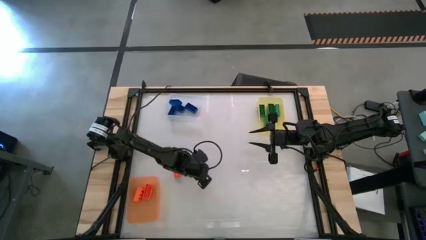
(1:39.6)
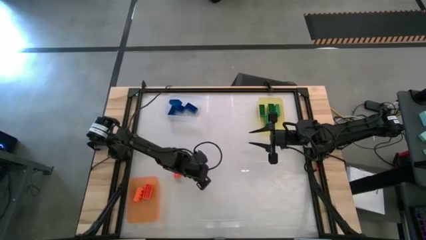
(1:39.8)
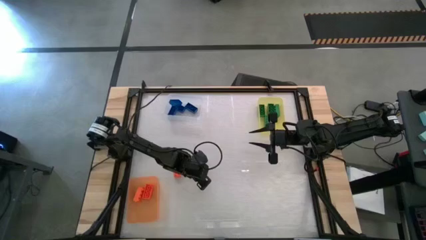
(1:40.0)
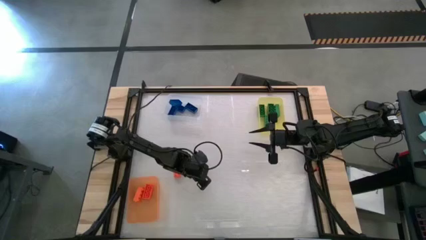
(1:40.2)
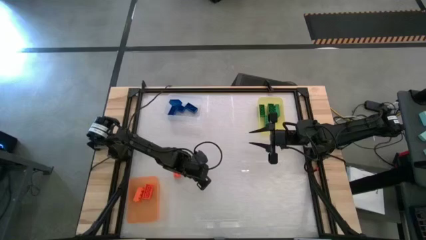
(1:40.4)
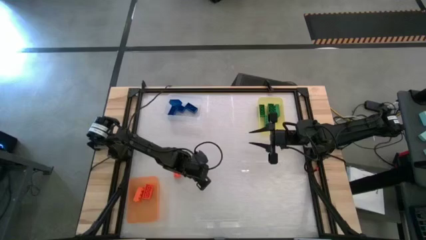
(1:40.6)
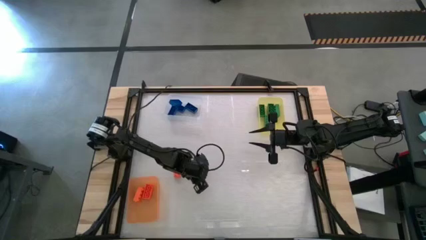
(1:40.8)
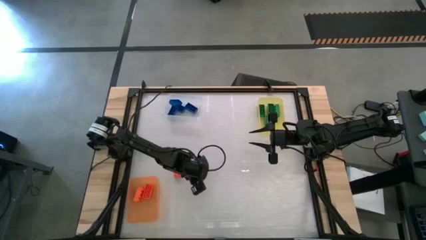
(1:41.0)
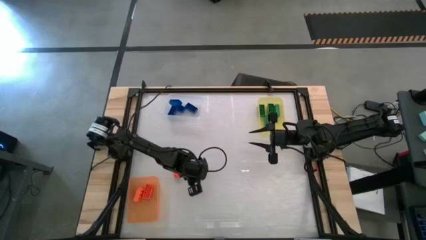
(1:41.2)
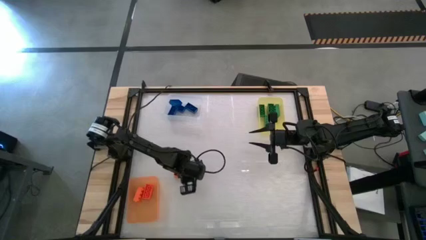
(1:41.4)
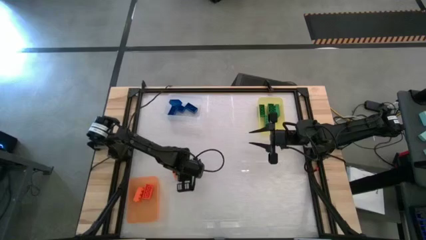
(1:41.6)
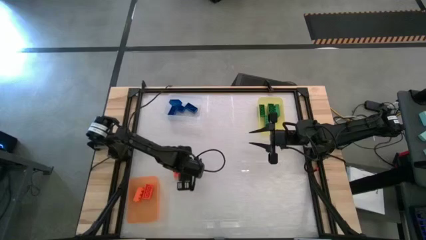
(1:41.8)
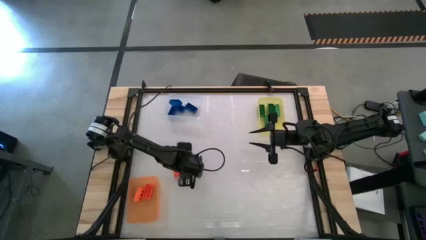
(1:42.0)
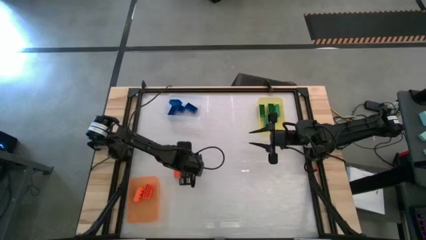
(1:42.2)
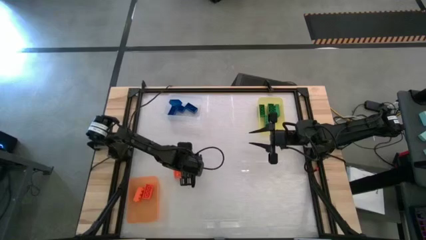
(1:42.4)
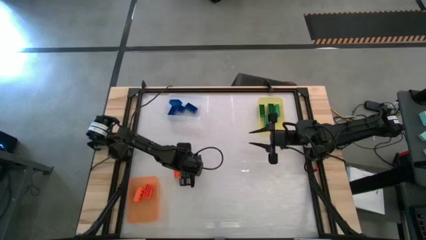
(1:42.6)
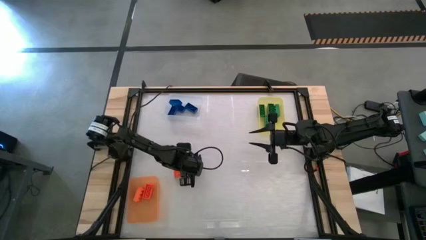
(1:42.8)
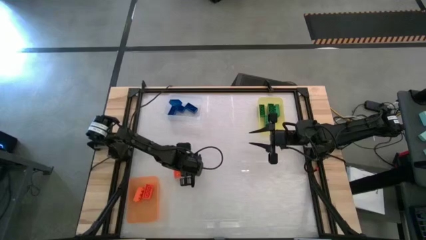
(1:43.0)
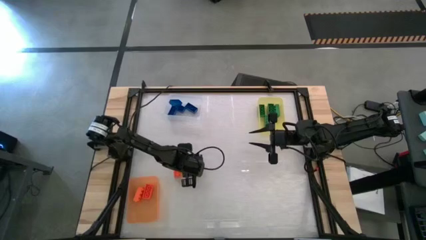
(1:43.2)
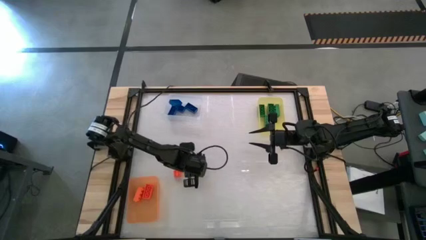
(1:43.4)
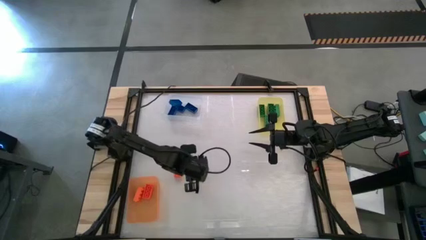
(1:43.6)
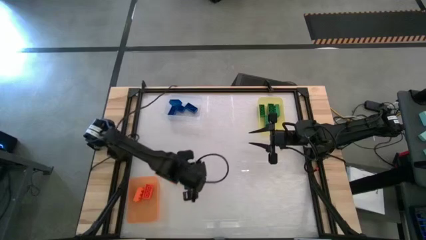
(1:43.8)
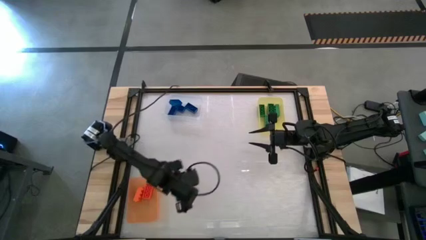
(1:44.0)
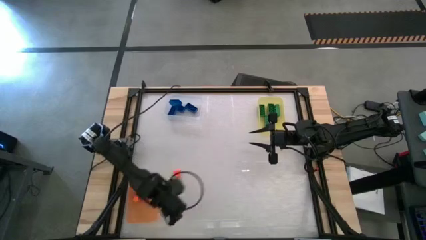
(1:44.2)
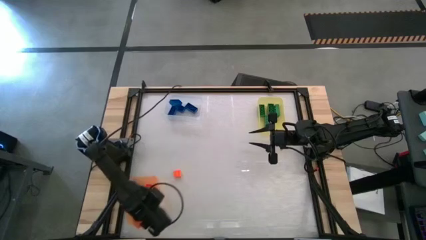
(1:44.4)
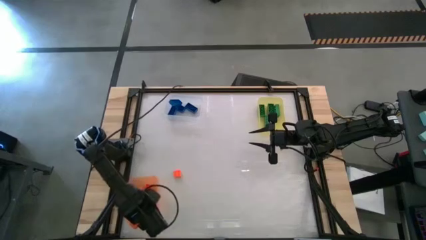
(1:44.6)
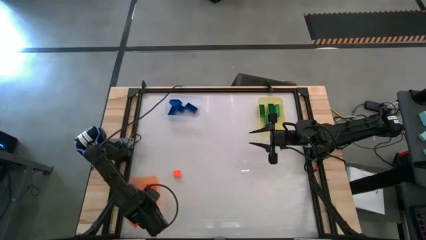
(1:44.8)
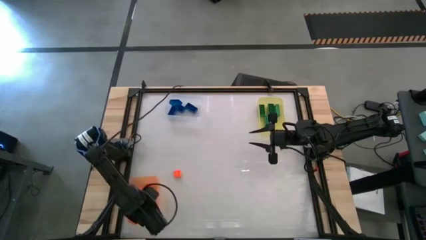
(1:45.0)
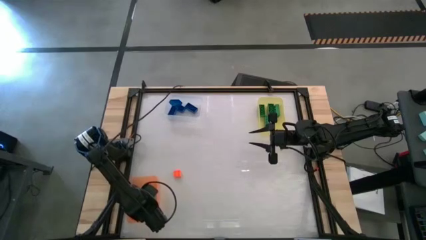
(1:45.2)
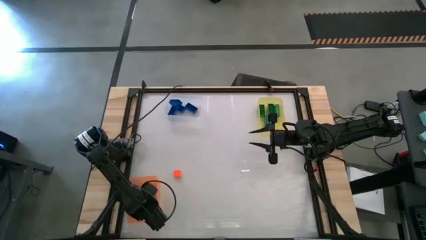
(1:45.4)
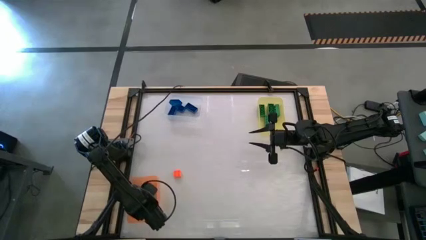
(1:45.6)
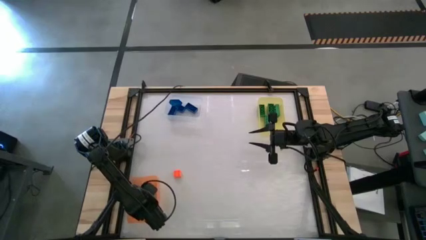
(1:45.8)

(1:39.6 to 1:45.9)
Task: Sort & place blocks by color
Put the orange game piece into the orange bin

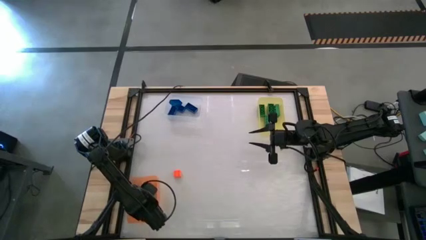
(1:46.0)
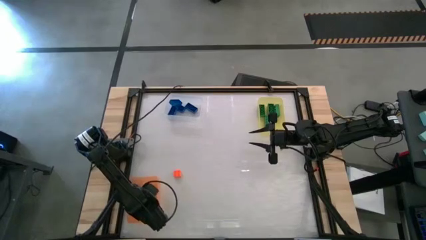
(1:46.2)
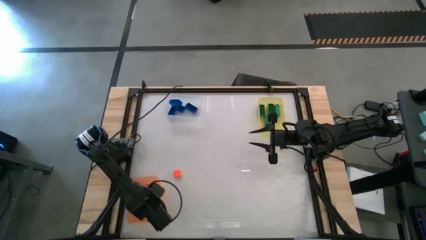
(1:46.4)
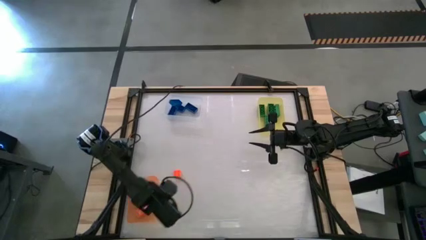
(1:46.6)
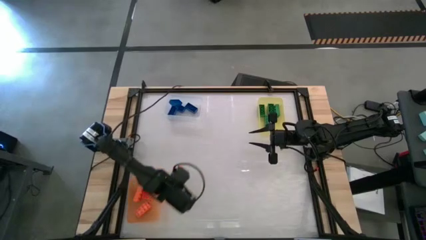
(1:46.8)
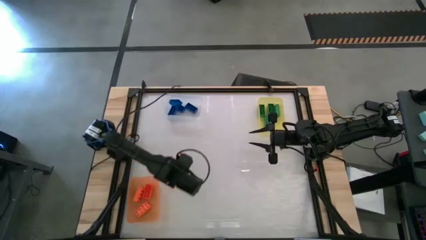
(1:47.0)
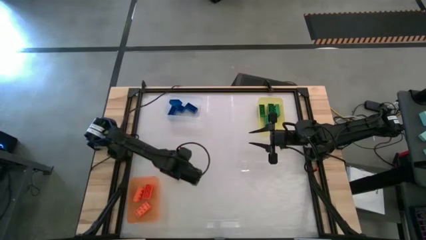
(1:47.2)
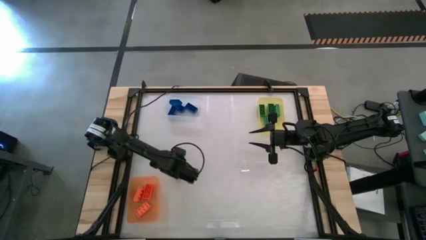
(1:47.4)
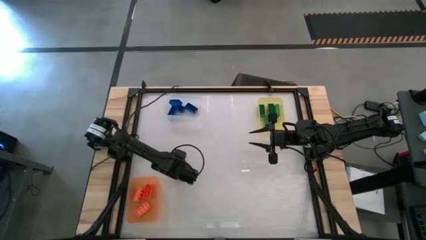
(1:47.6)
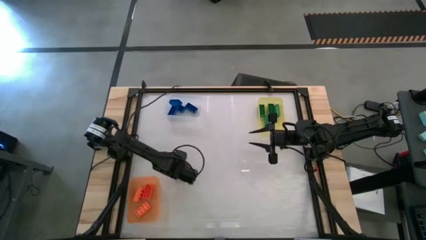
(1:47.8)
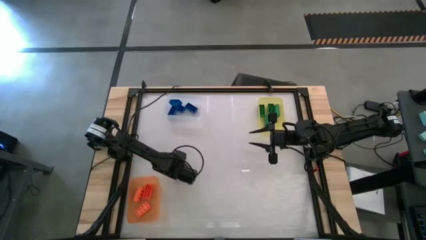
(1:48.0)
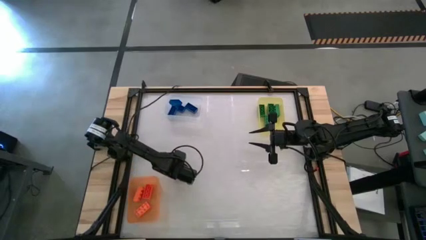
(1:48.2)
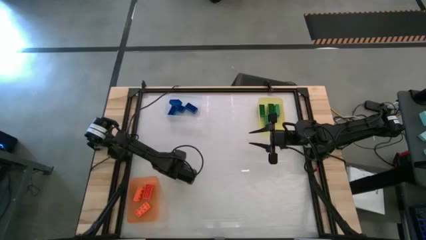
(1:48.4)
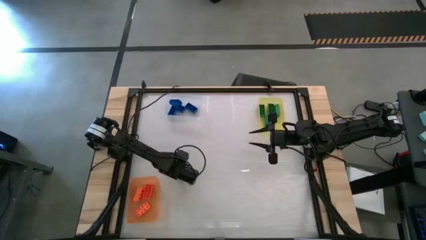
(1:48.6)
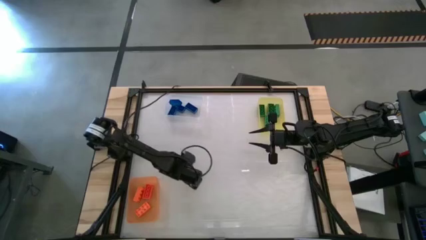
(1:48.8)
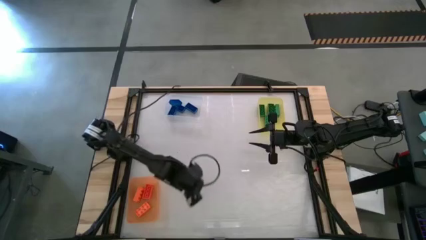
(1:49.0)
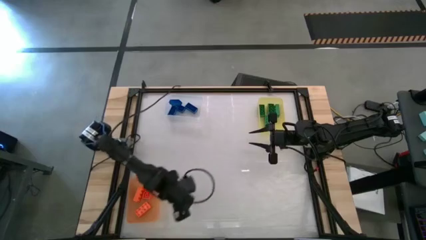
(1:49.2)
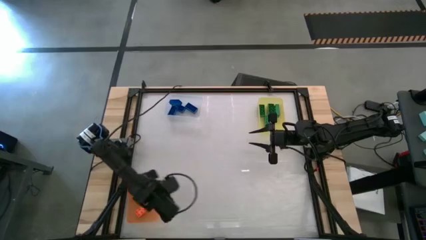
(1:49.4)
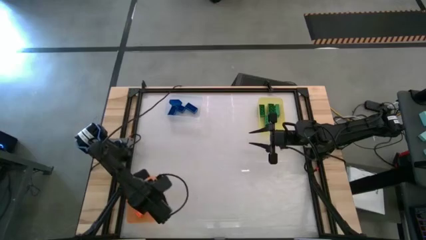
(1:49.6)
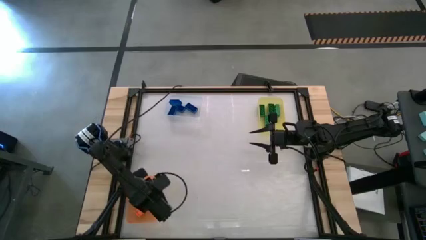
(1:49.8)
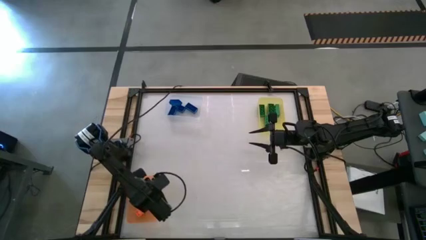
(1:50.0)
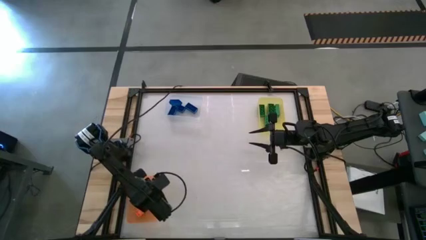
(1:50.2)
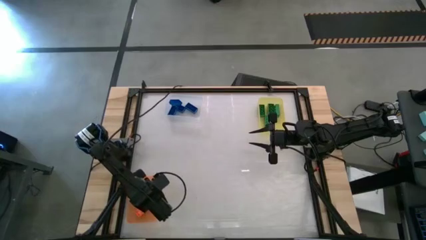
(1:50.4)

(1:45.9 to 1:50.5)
Put the orange game piece into the orange bin

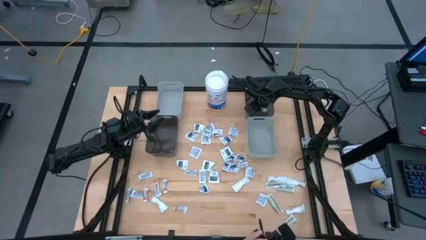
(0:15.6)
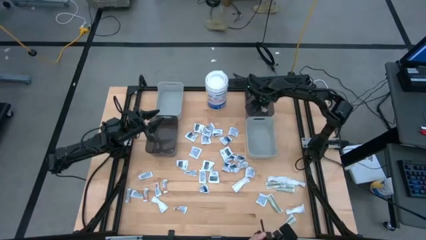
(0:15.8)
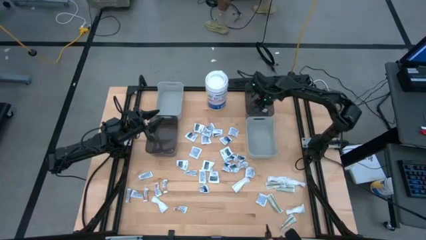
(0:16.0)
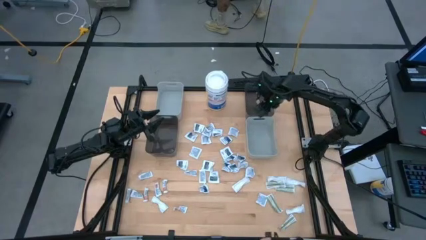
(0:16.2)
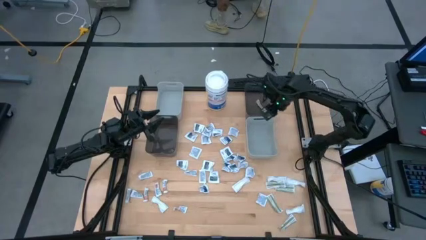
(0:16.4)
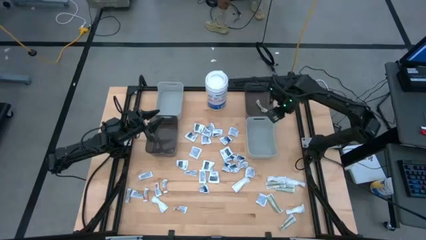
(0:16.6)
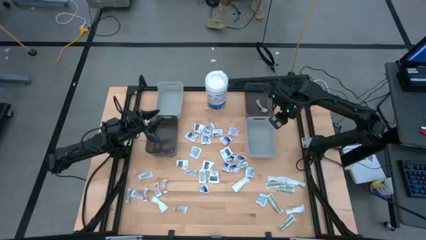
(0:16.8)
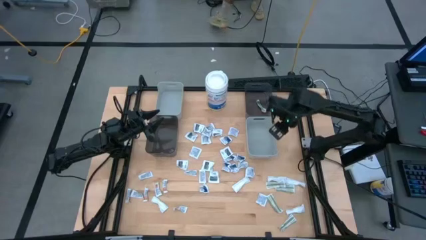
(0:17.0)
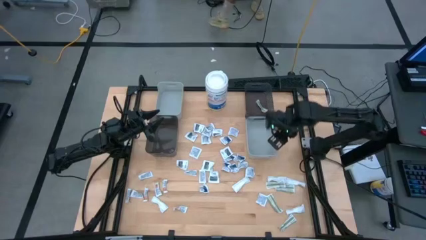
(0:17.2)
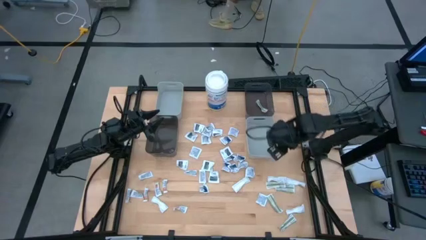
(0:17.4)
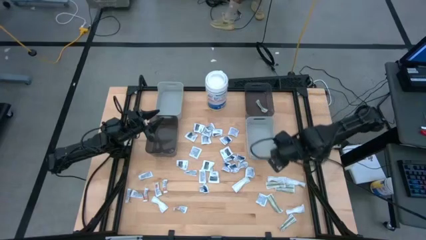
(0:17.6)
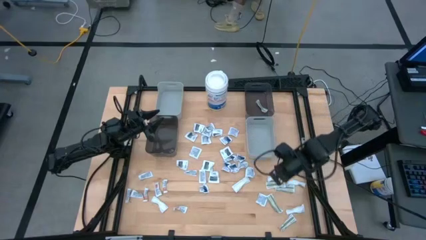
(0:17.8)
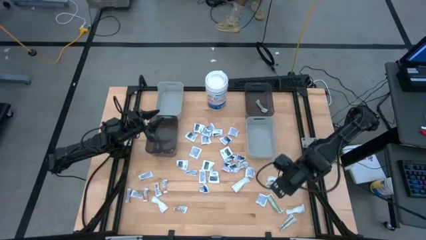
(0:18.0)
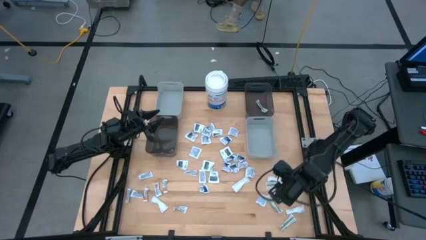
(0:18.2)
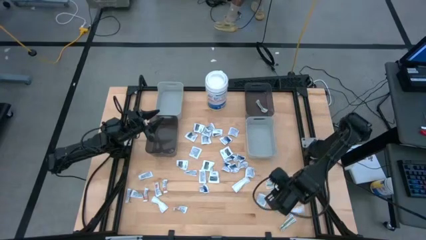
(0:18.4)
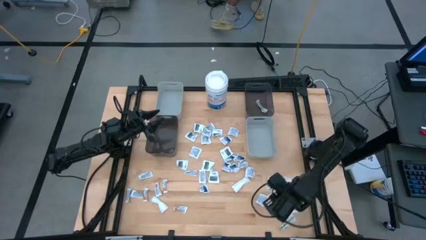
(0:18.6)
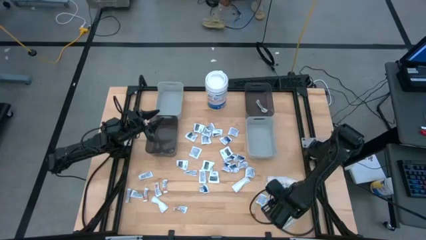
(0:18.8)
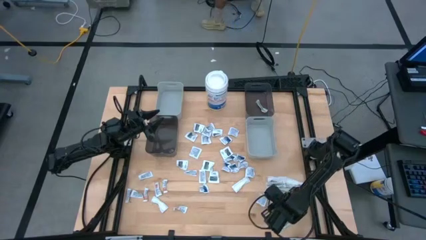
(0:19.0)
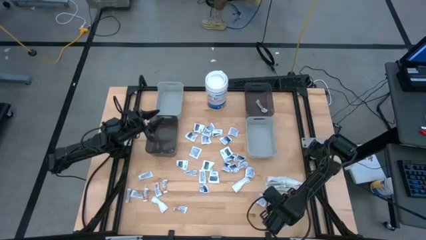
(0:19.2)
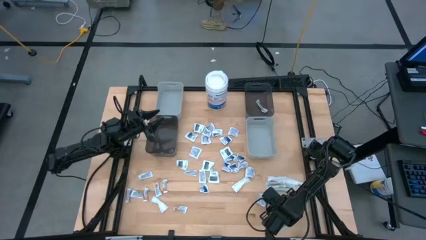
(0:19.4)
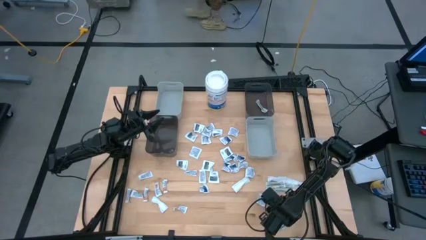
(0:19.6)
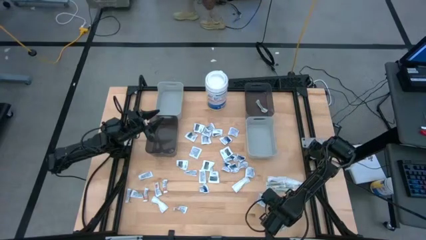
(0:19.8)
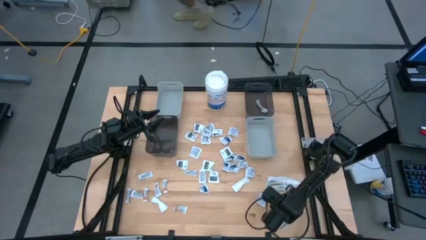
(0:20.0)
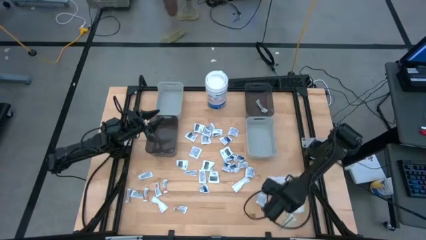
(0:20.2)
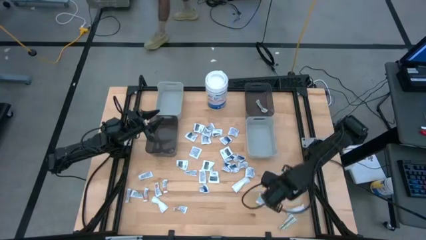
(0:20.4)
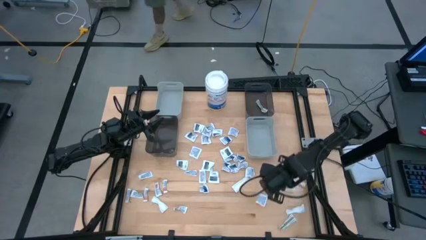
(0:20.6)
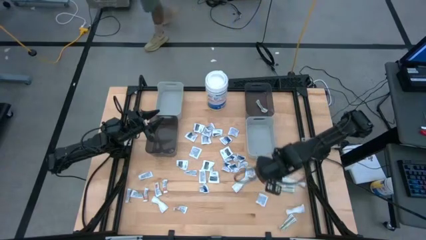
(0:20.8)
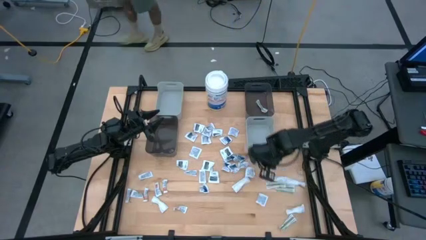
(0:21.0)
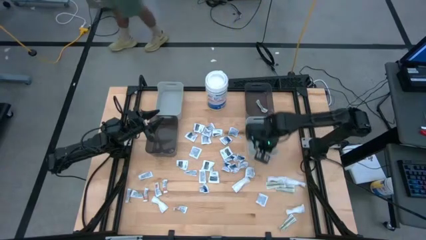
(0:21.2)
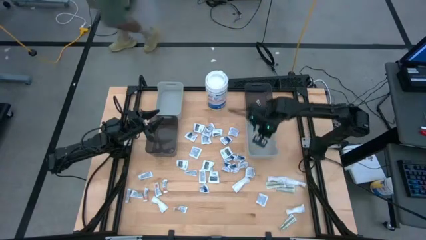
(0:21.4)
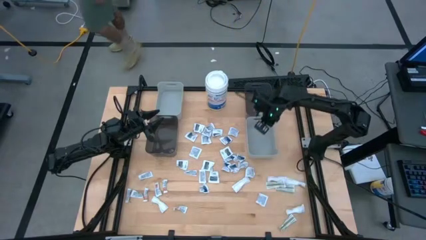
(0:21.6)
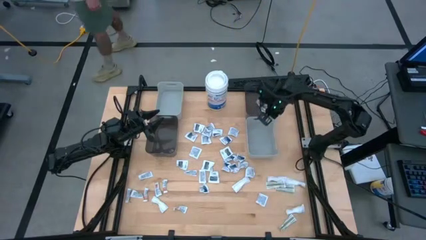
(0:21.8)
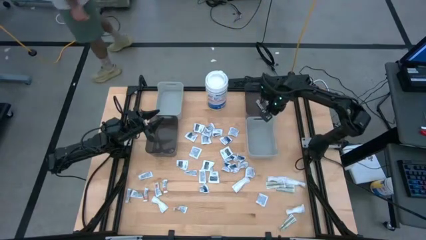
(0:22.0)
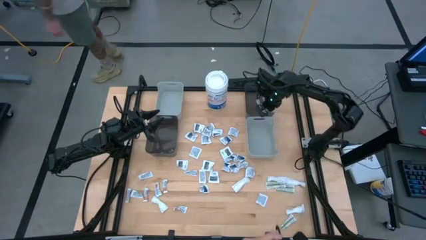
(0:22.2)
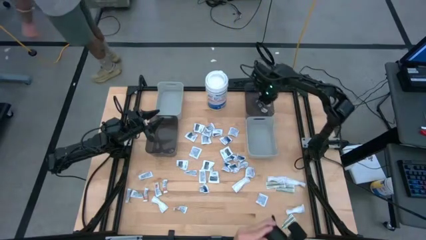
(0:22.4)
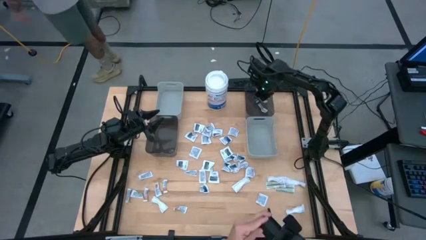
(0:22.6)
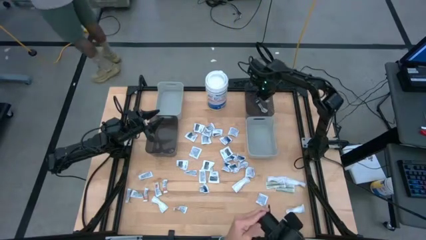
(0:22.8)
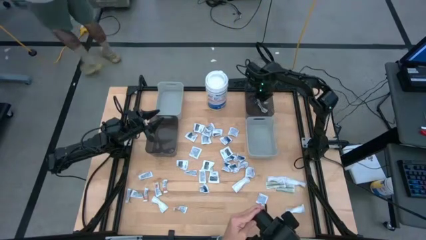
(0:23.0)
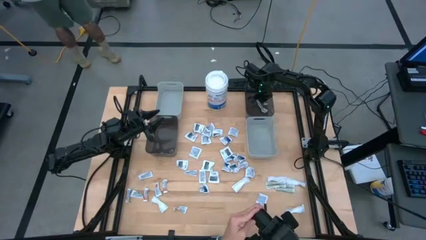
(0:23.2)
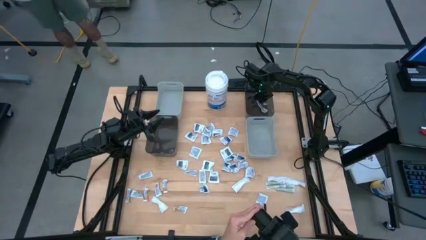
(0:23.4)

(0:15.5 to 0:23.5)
Task: Pick & Place First Aid Supplies
Put the green bandage into the right black bin
